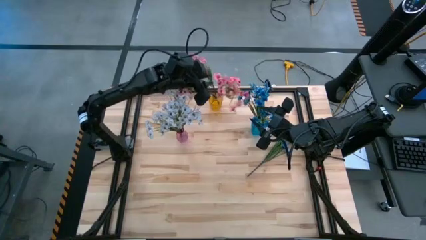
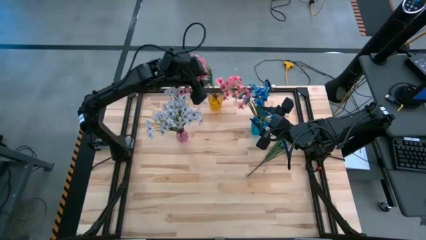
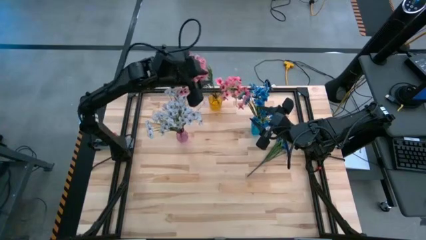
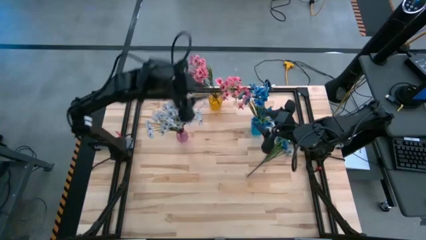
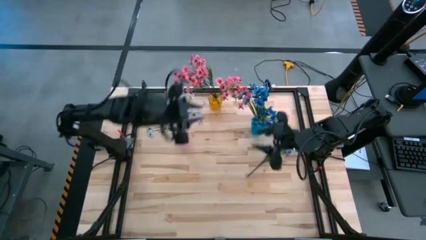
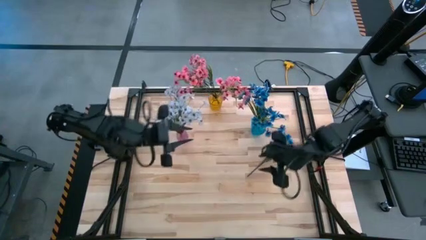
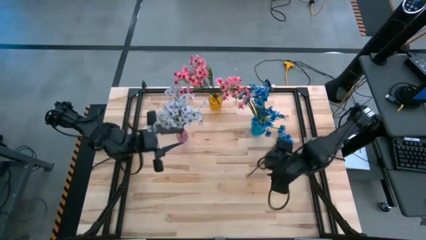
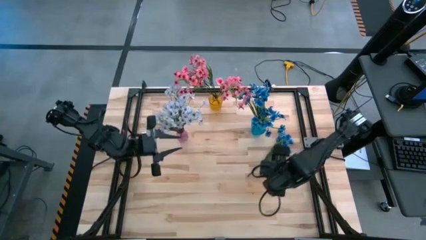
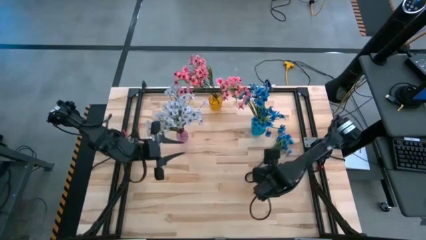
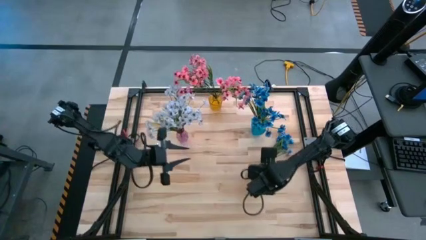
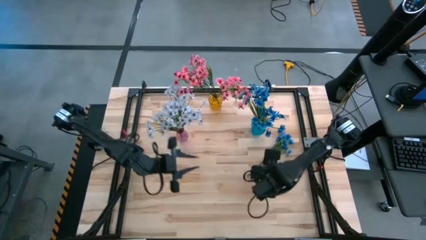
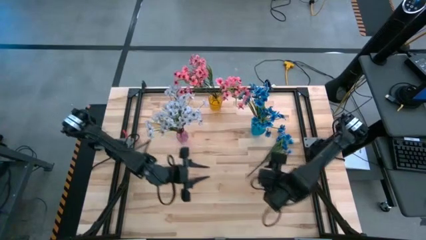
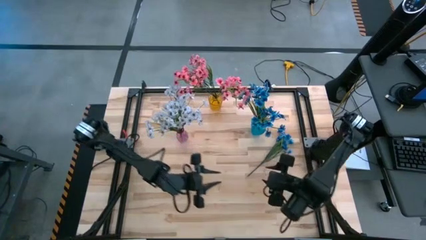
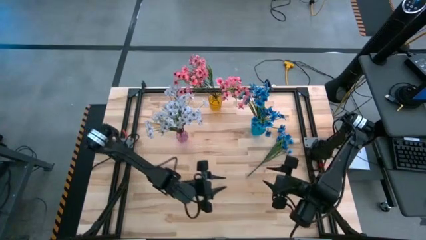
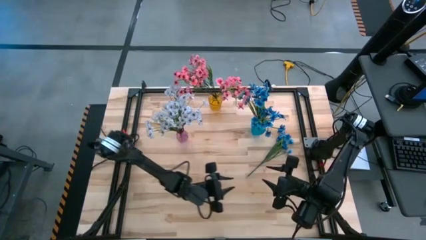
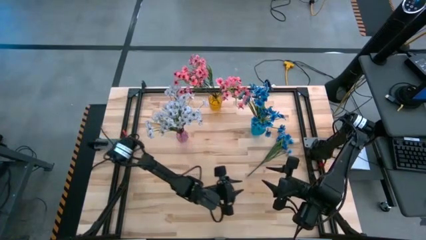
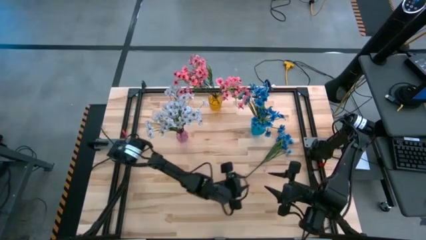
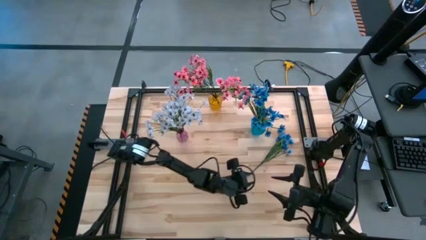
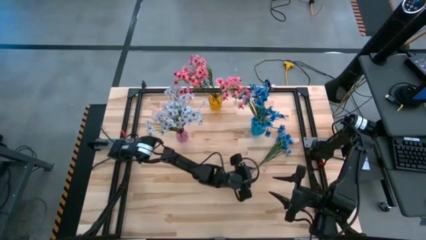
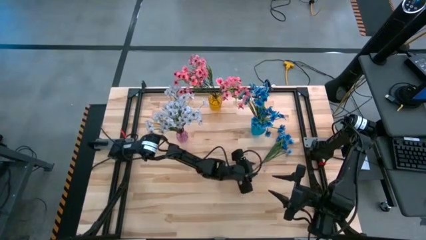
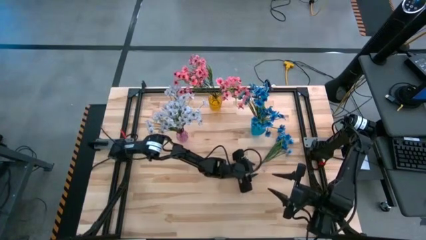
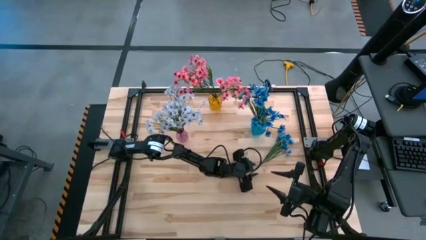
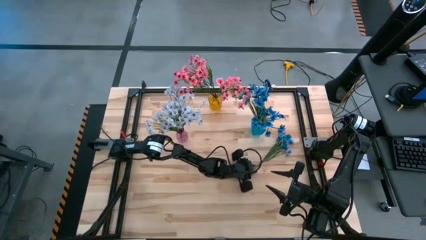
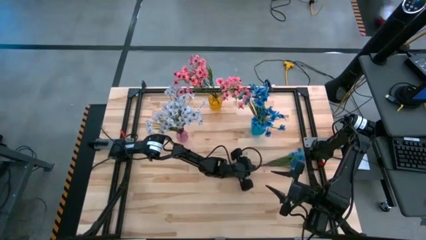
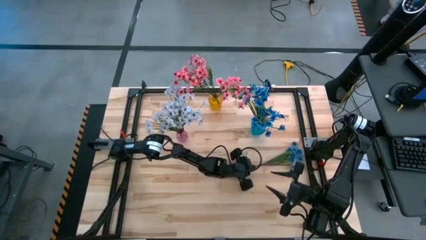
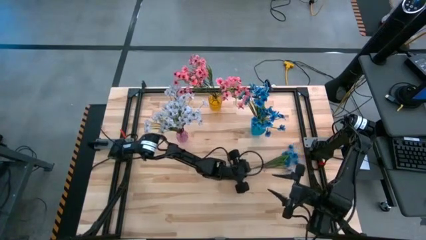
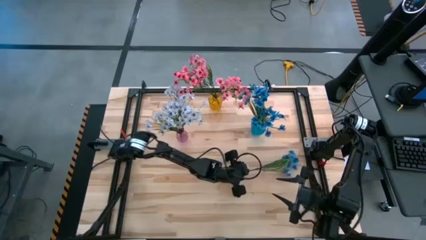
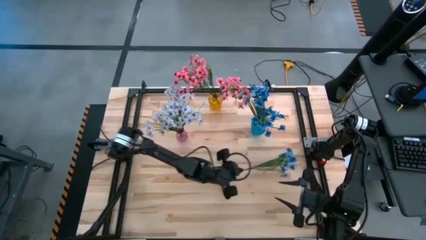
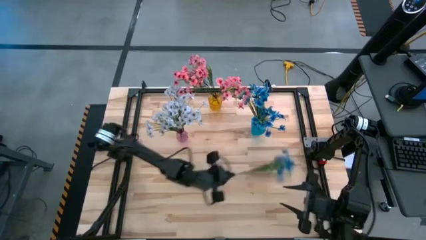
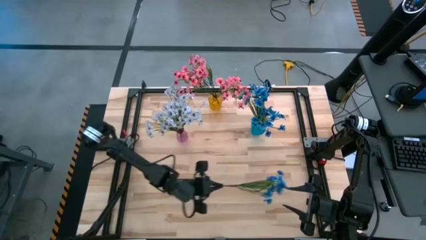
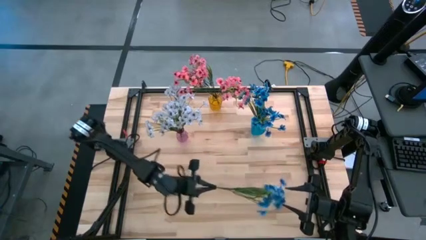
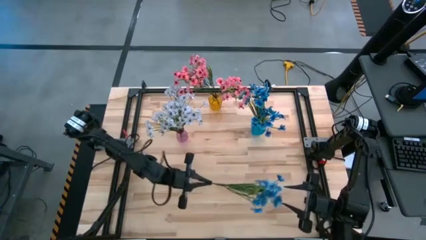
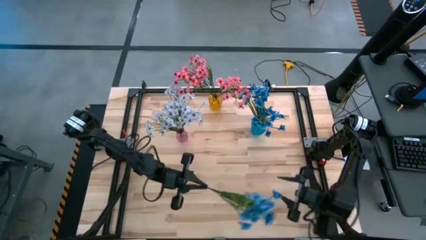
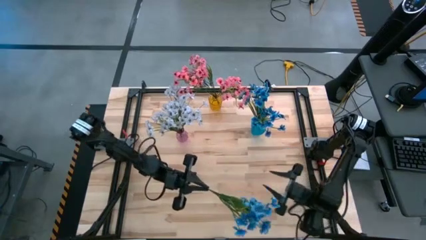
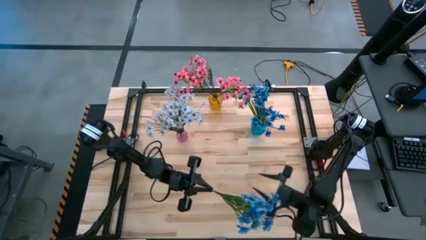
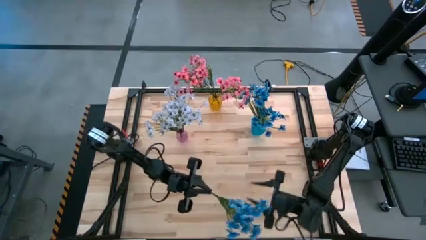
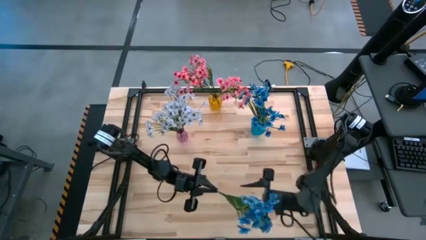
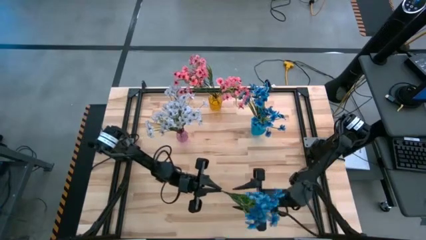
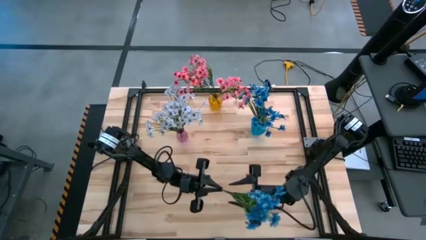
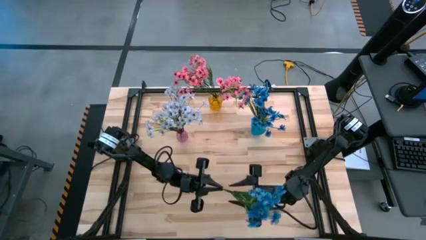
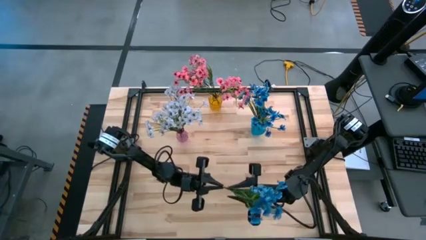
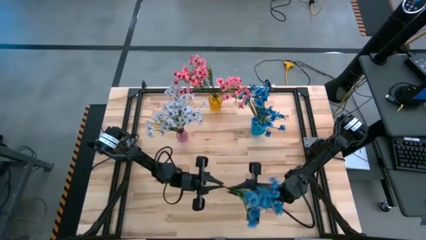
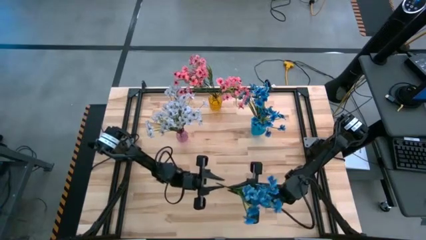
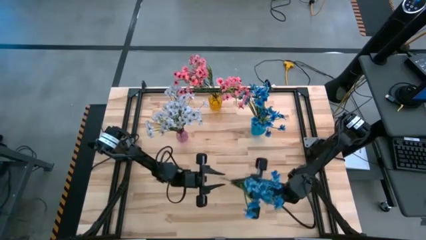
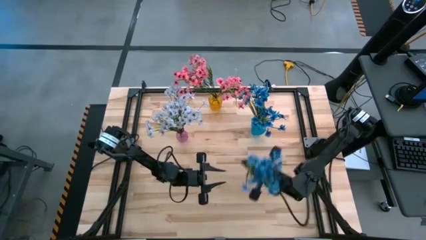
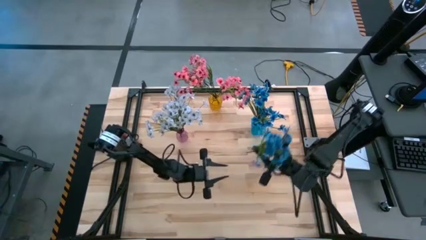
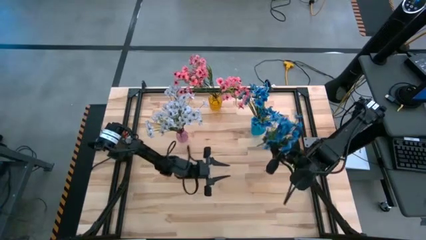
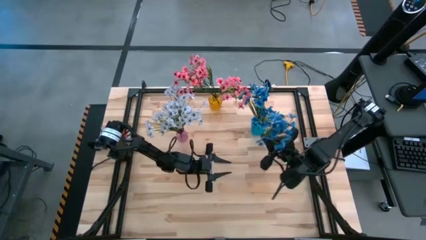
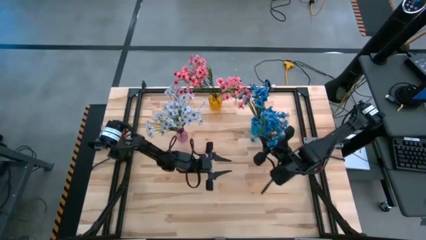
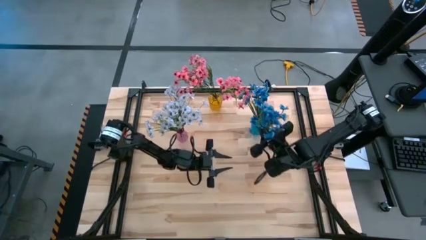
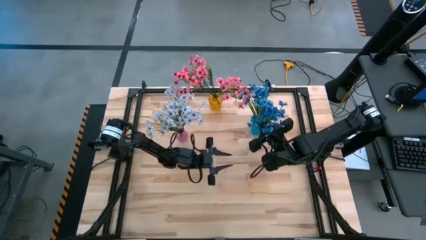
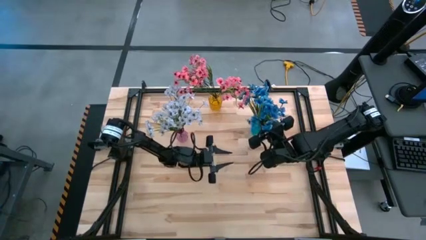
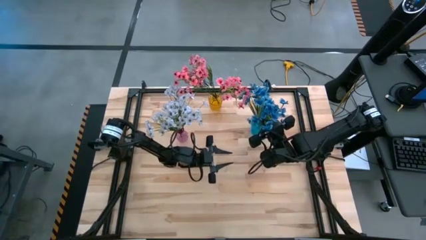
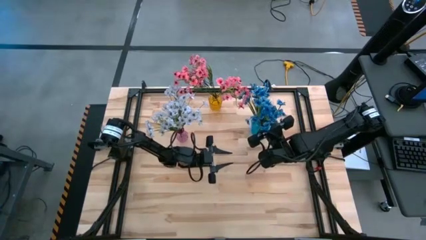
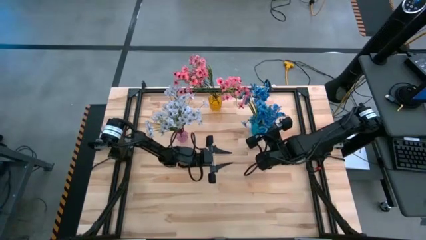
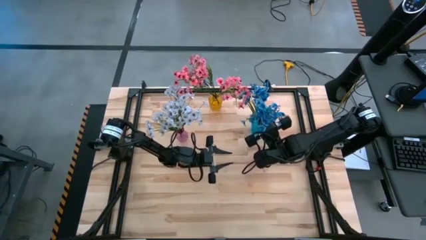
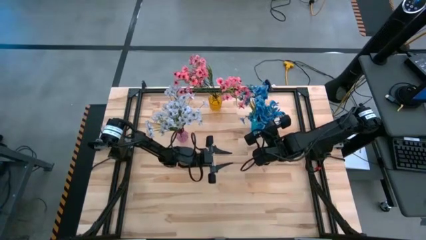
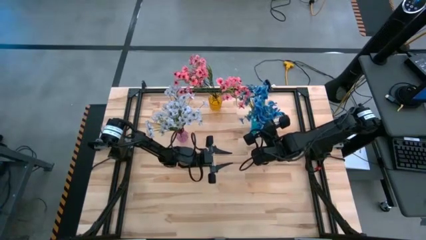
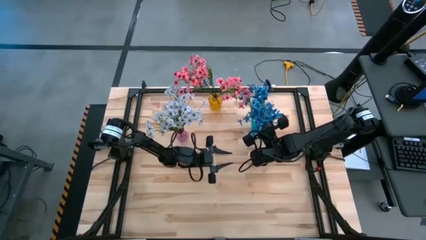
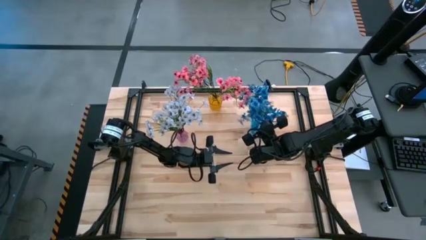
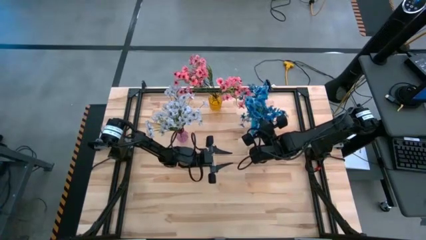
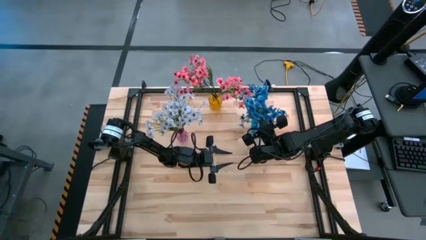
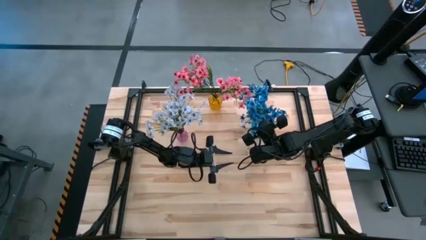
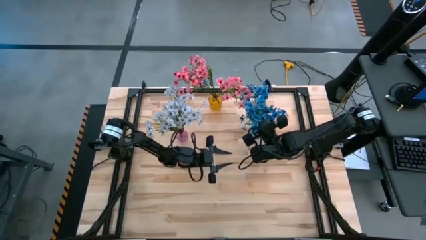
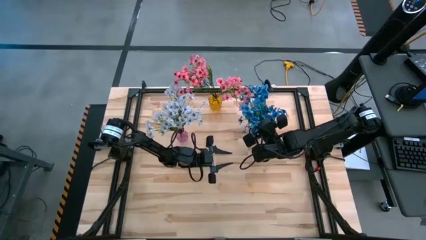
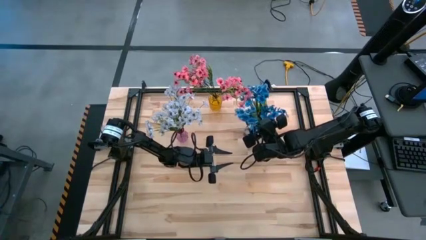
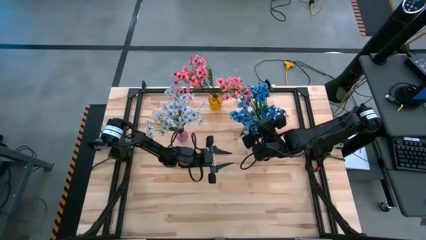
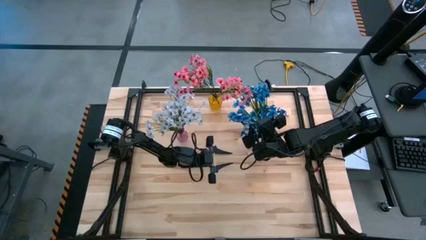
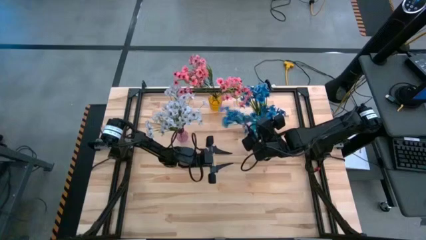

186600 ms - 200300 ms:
Task: Sort flowers into vase by color
Put the blue flowers into the blue vase
